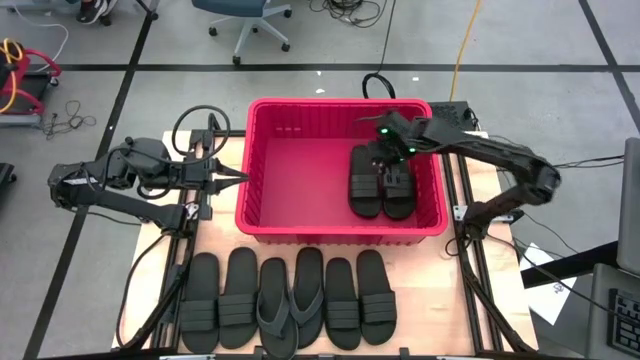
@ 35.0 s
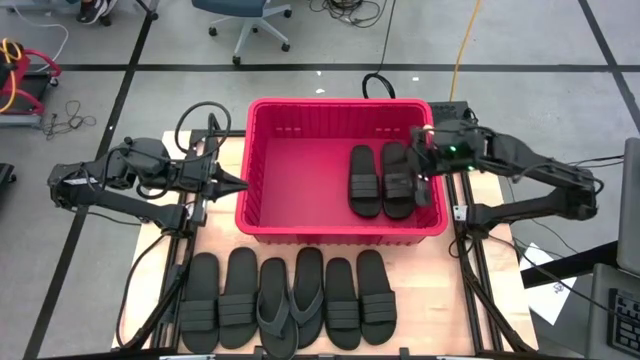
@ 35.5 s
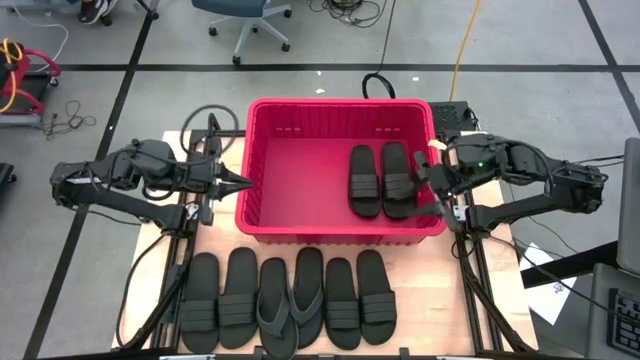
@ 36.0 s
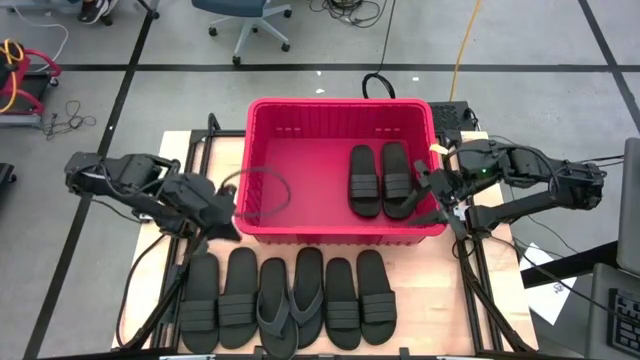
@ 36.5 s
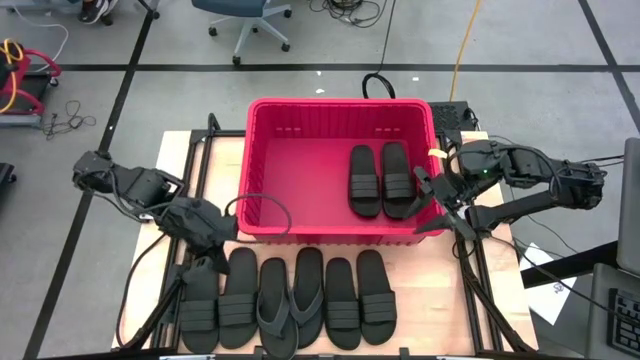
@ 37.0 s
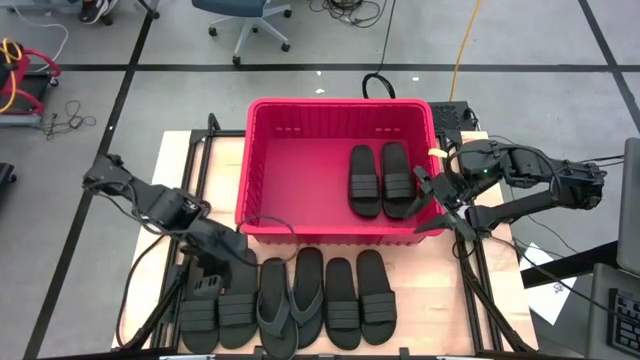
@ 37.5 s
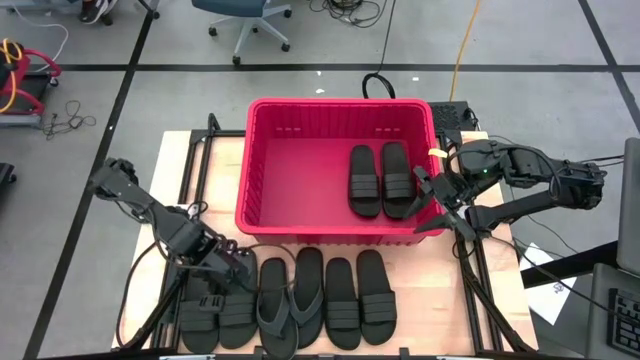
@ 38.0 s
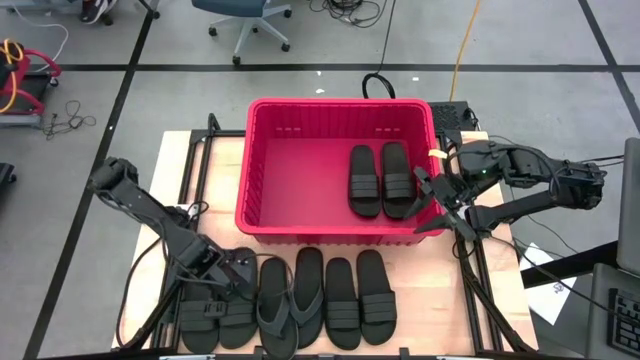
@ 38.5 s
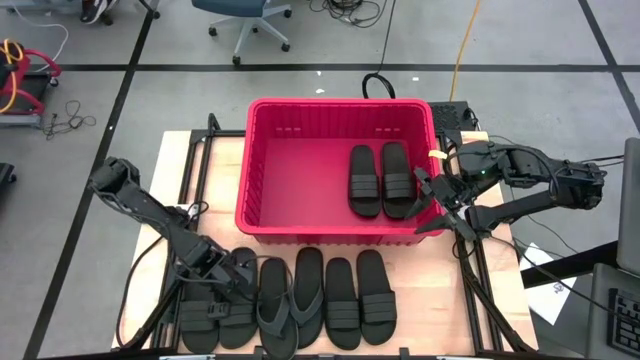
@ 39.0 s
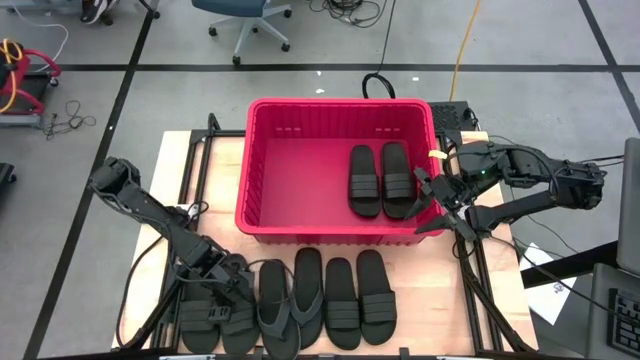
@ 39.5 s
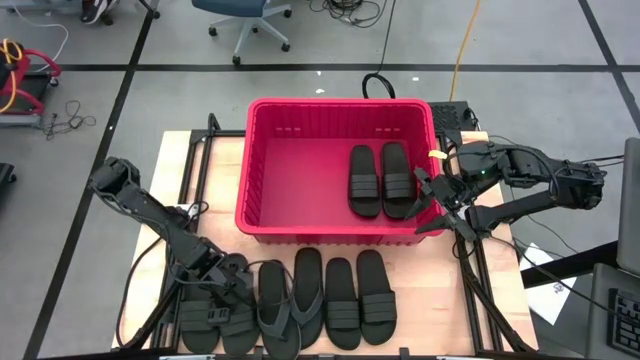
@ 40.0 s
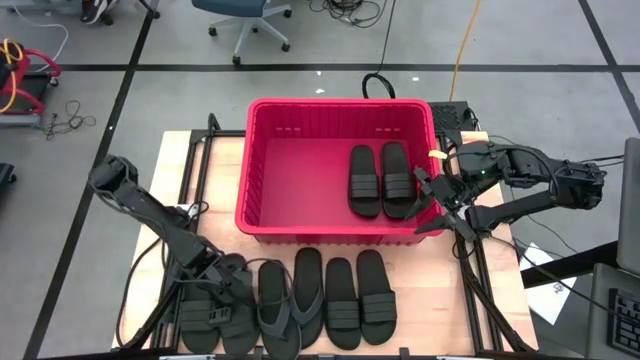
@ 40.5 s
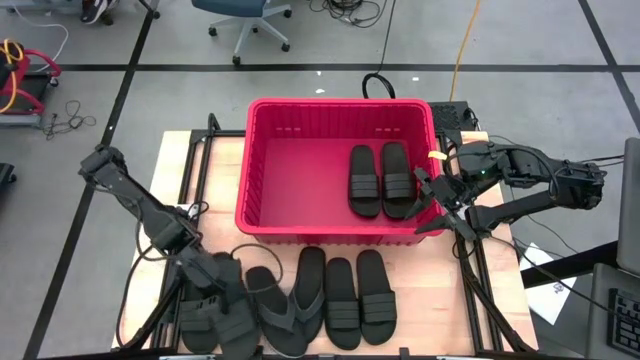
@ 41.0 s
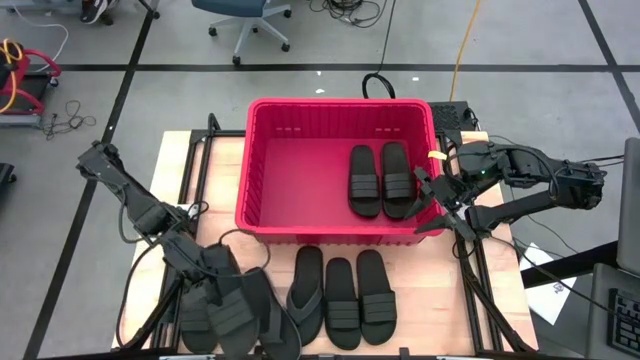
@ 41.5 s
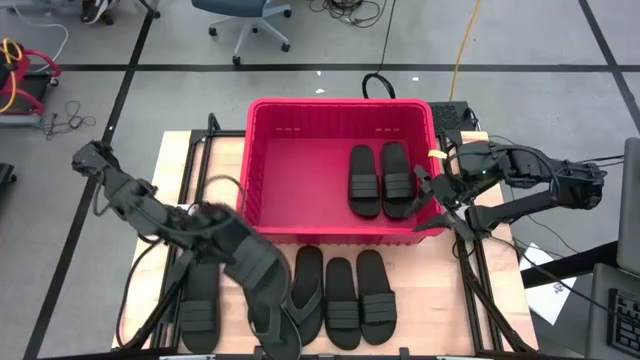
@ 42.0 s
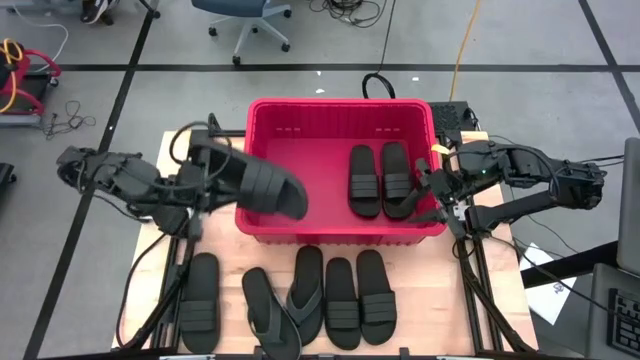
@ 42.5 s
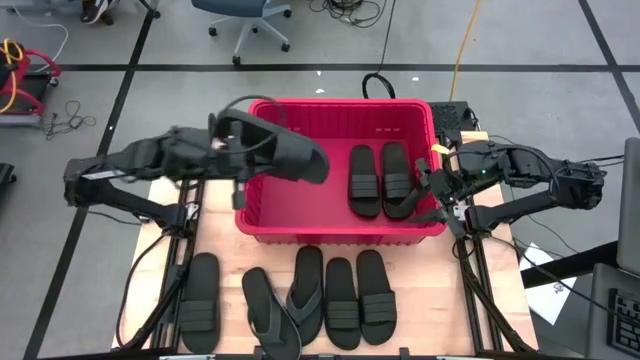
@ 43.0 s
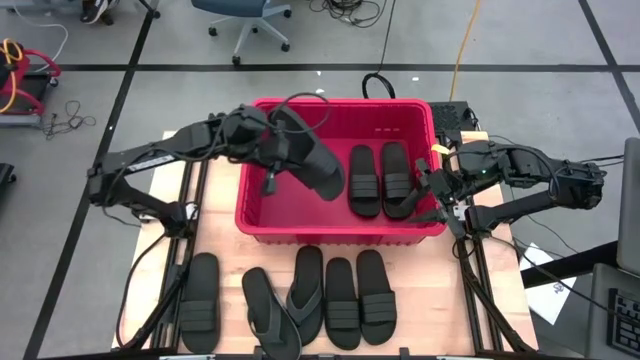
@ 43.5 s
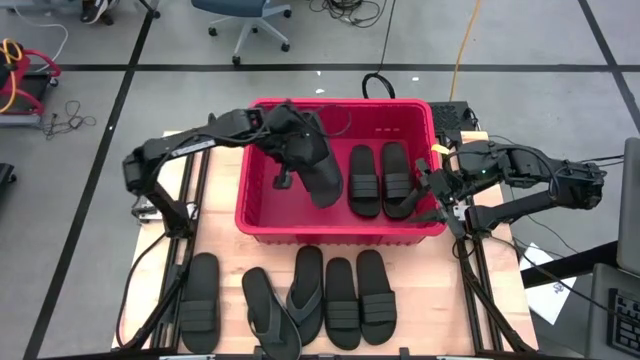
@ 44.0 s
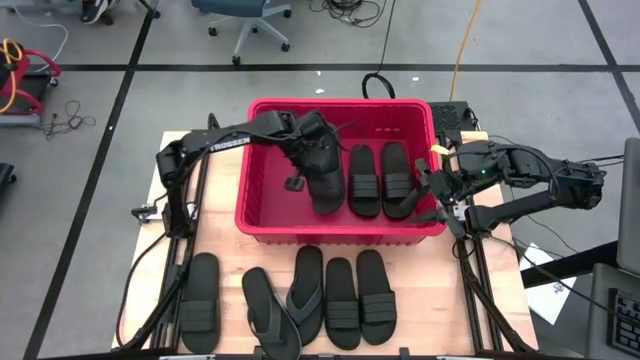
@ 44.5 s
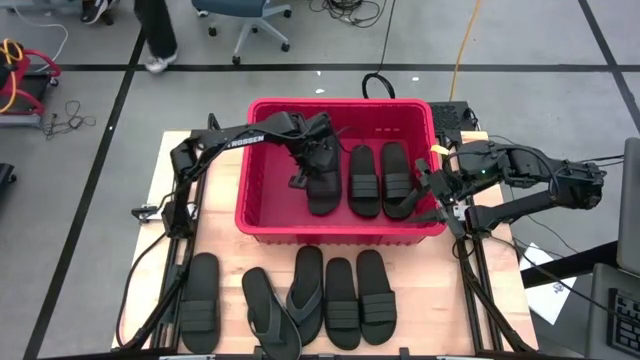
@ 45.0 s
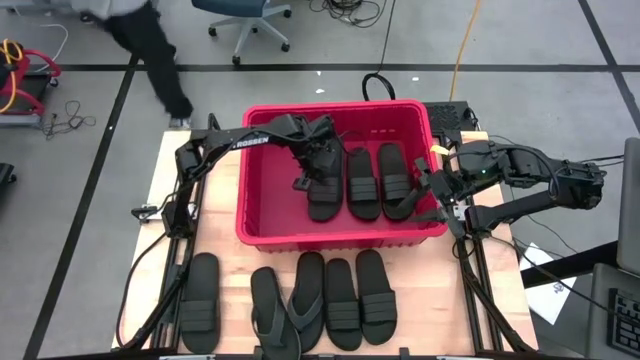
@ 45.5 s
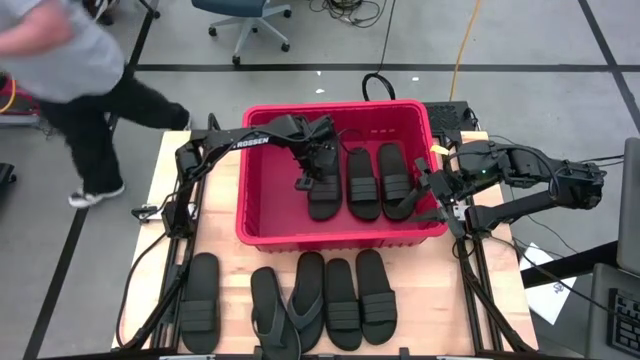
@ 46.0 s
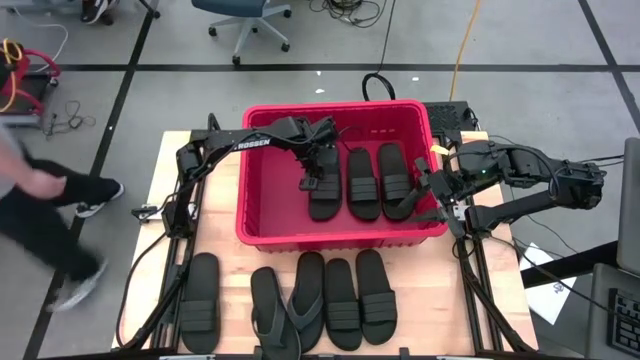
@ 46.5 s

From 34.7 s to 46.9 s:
Task: Pick and place slides into bin
Put the black slide into the red bin

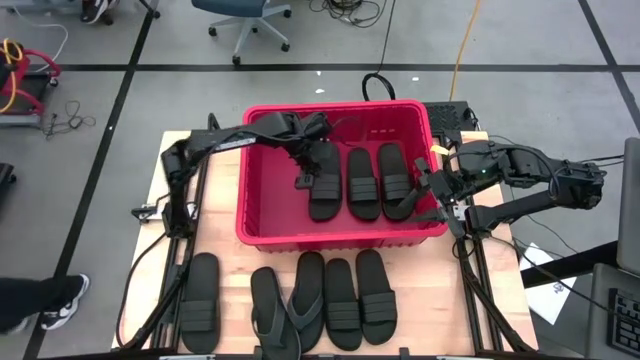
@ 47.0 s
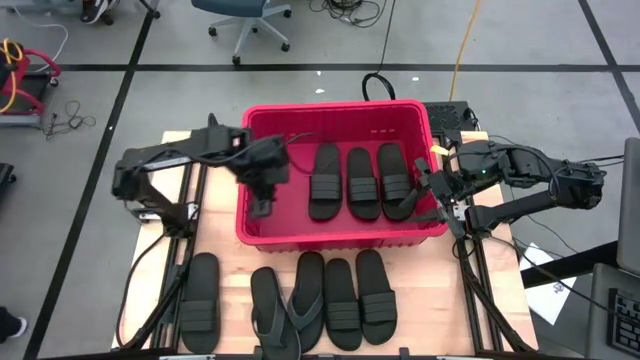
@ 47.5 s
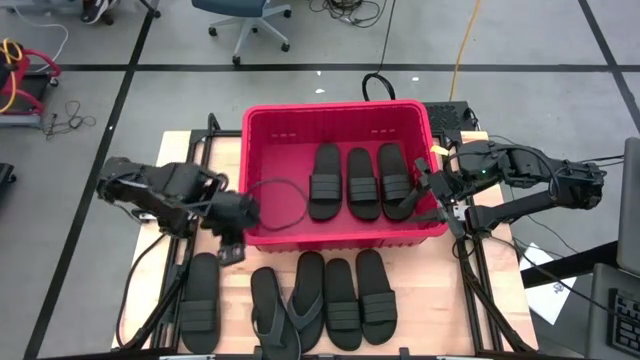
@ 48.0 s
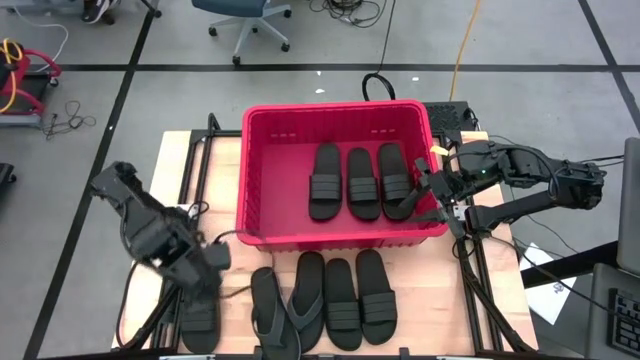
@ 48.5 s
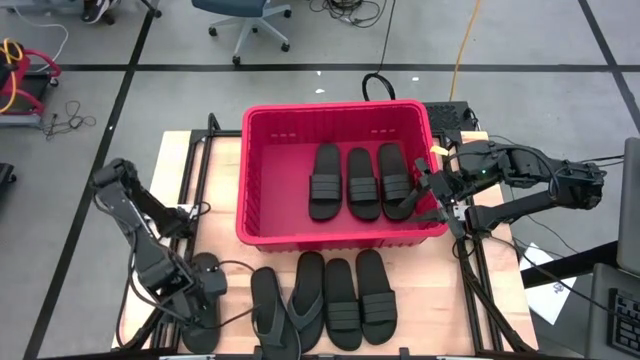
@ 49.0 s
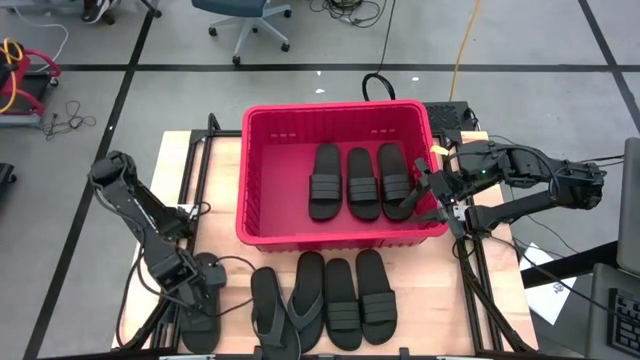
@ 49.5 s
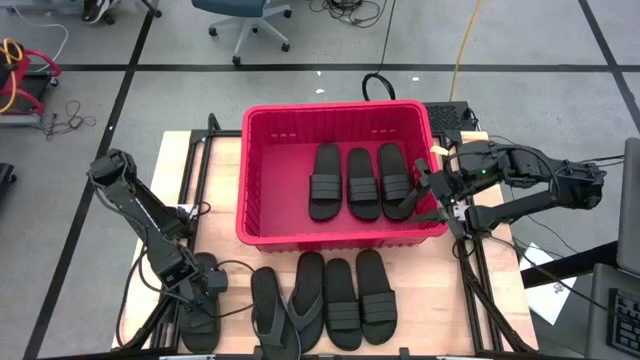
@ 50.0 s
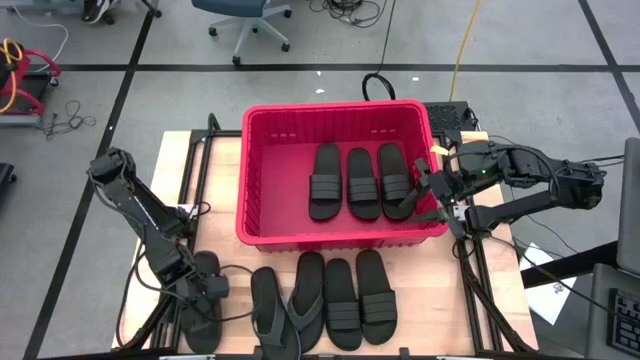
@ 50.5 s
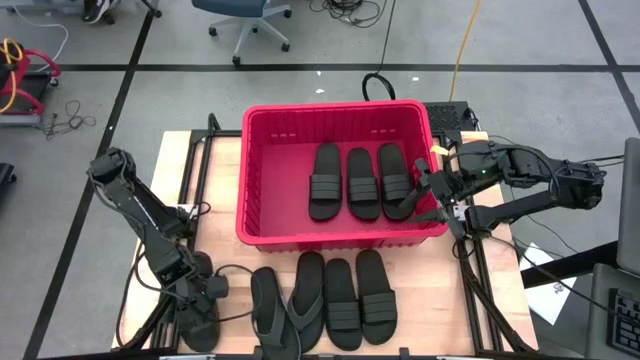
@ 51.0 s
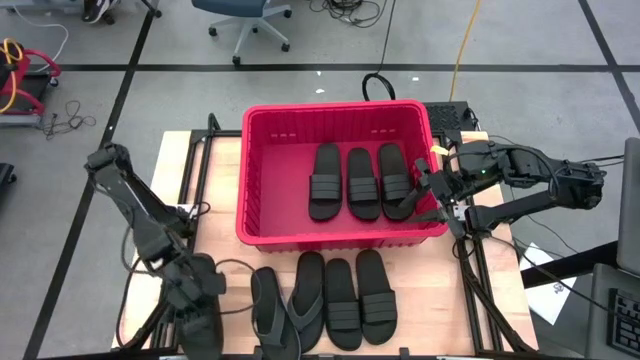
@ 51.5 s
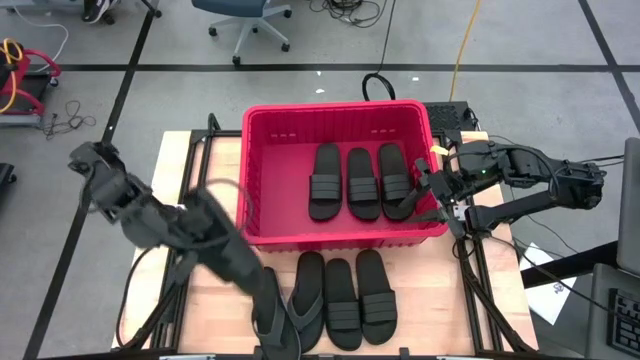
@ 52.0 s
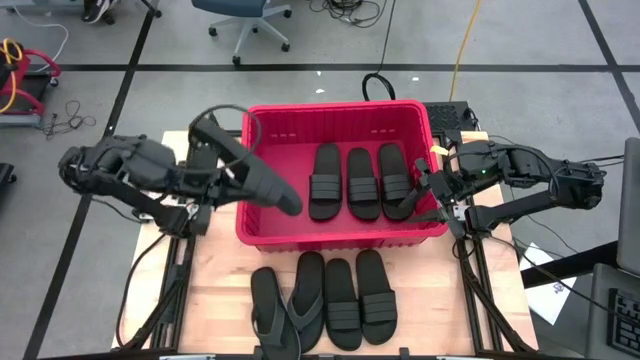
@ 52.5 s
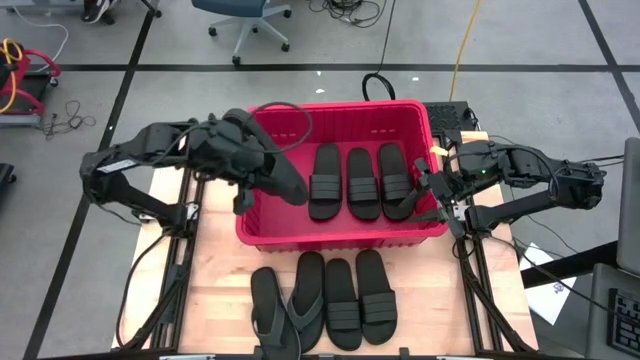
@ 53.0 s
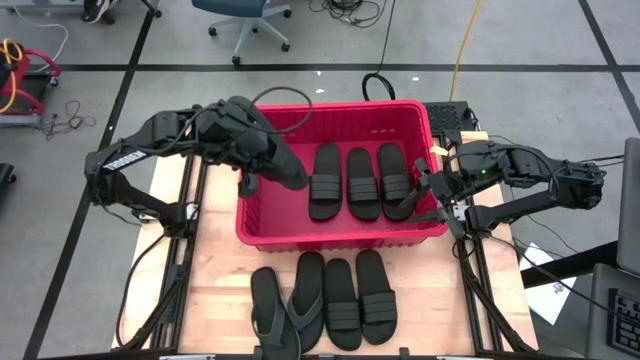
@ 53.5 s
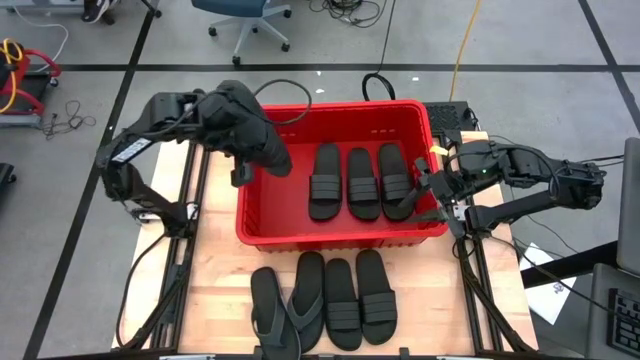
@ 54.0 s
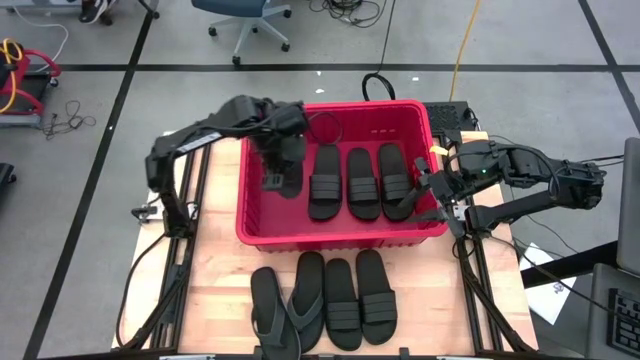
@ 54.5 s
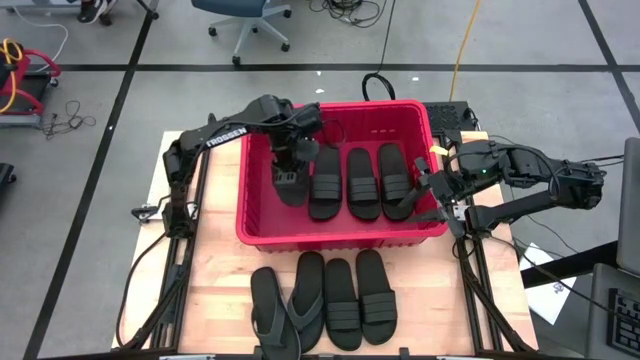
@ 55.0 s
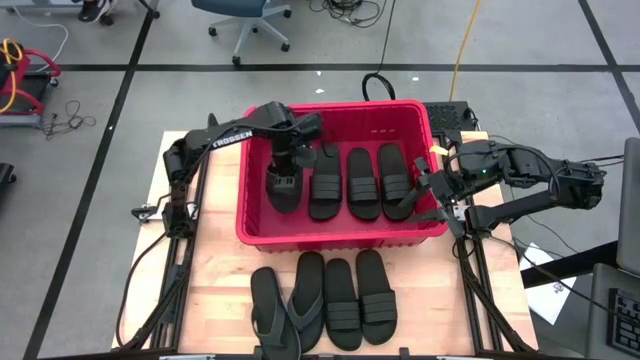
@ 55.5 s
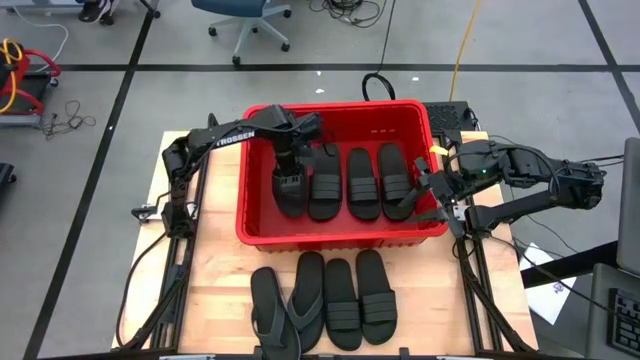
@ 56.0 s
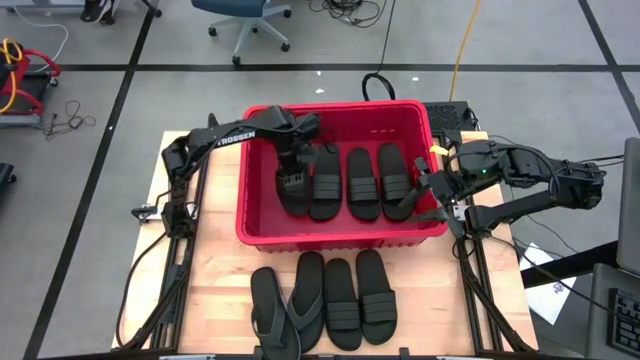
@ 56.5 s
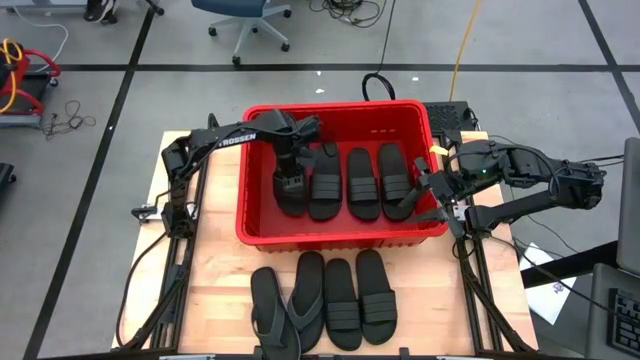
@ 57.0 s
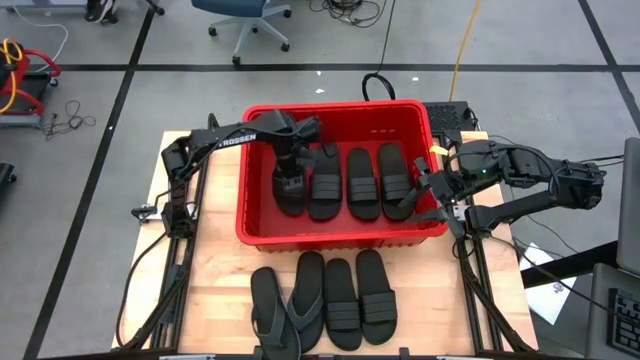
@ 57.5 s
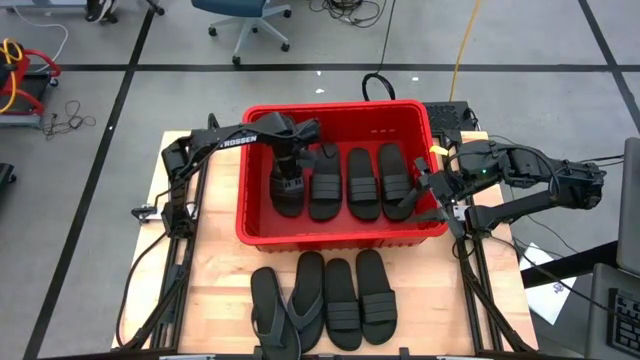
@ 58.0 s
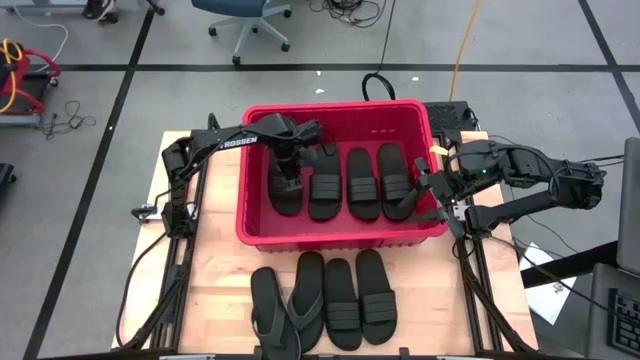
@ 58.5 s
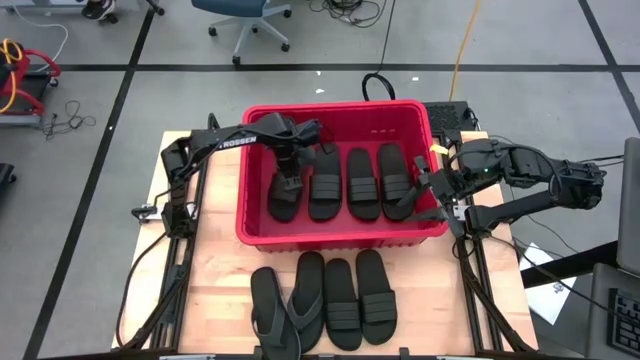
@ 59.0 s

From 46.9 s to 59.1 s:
Put the black slide into the red bin
